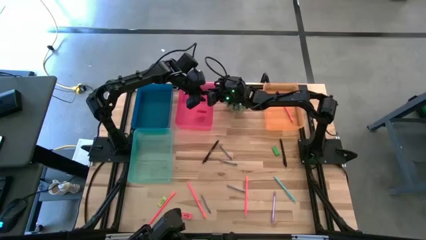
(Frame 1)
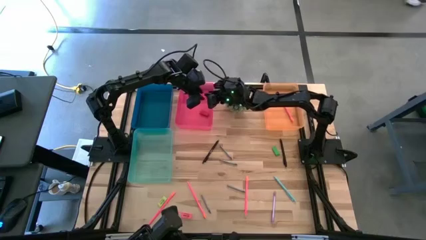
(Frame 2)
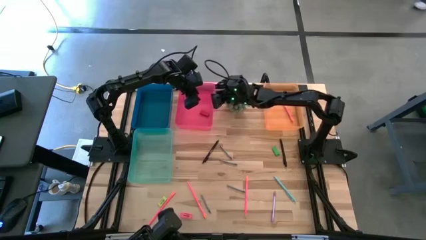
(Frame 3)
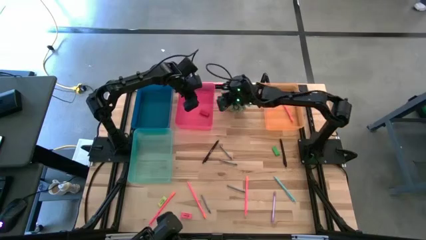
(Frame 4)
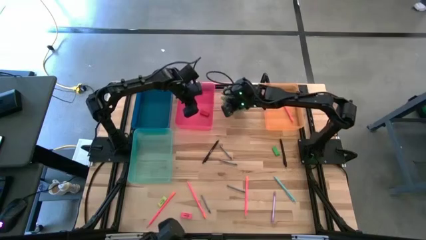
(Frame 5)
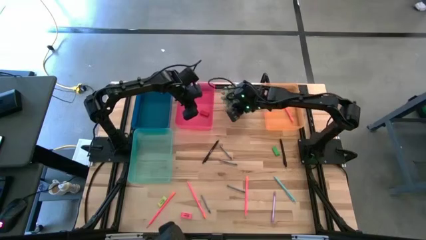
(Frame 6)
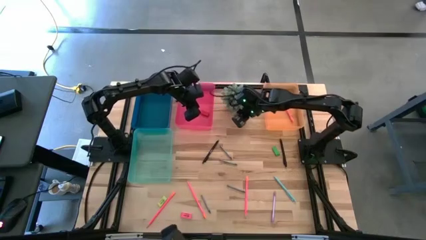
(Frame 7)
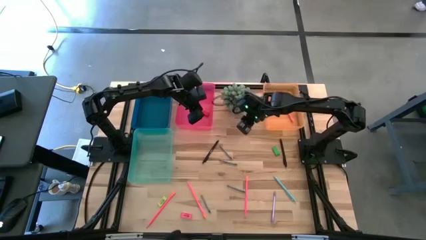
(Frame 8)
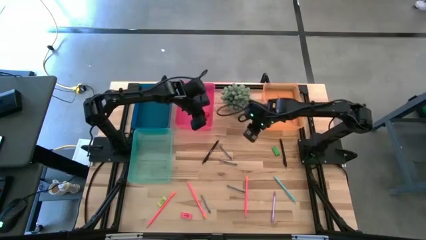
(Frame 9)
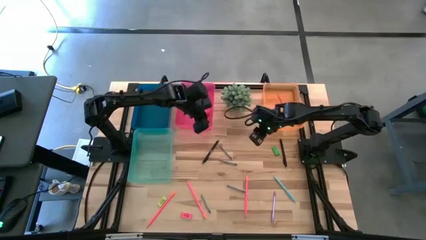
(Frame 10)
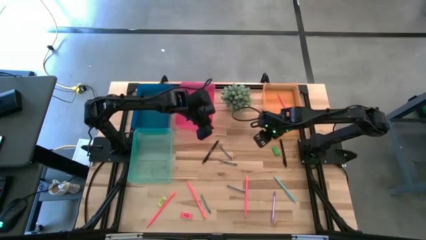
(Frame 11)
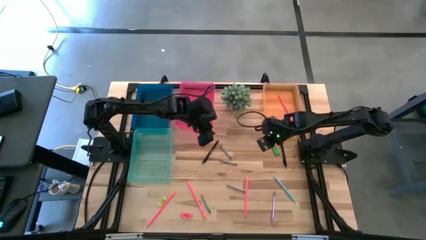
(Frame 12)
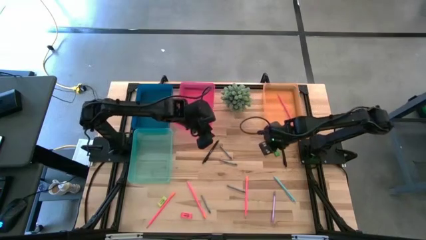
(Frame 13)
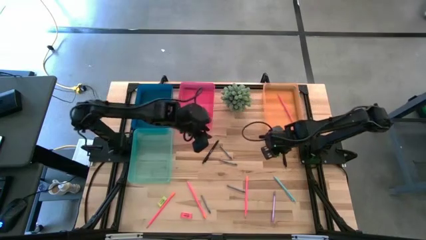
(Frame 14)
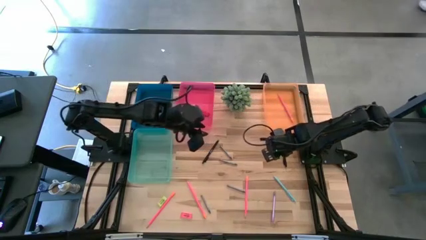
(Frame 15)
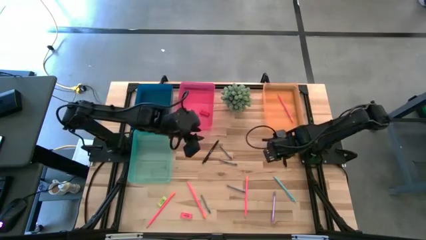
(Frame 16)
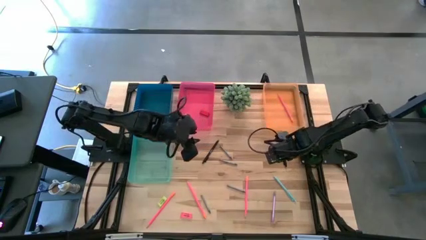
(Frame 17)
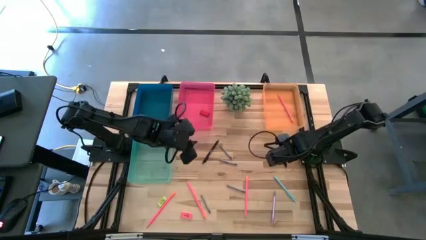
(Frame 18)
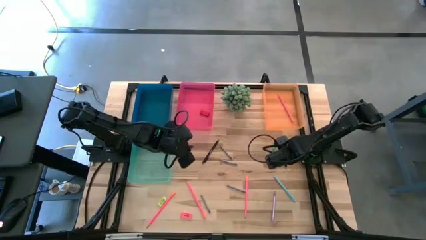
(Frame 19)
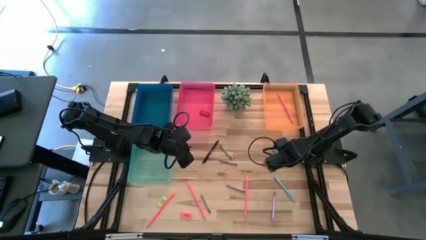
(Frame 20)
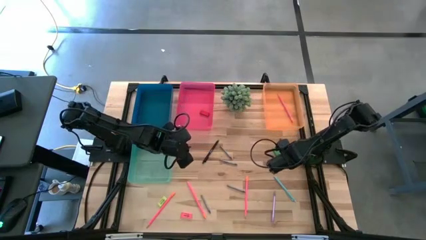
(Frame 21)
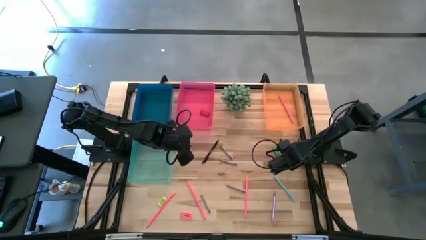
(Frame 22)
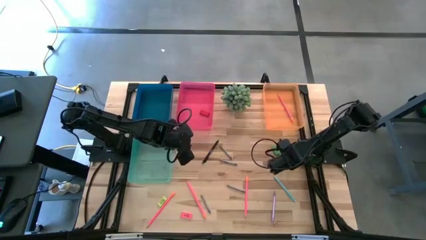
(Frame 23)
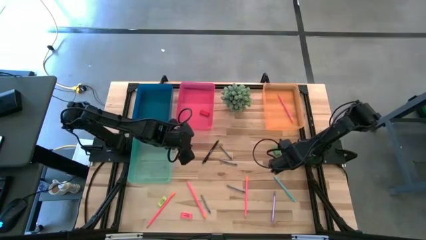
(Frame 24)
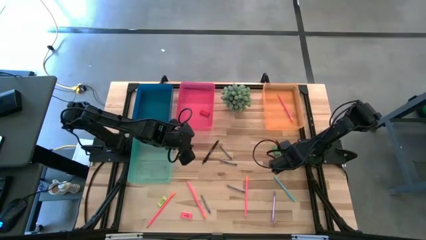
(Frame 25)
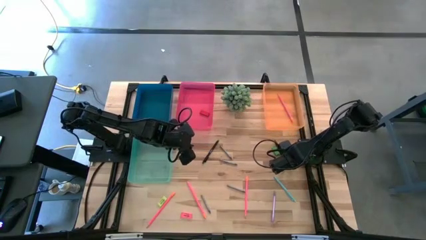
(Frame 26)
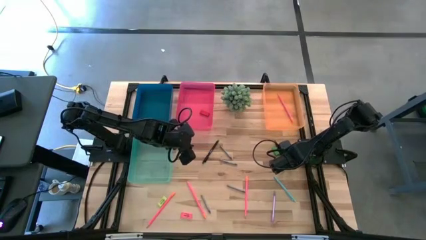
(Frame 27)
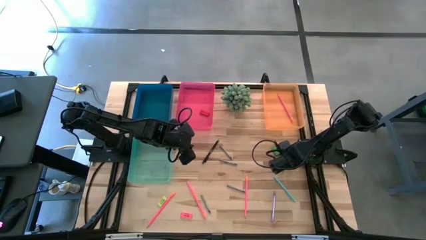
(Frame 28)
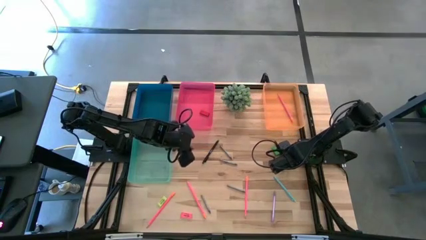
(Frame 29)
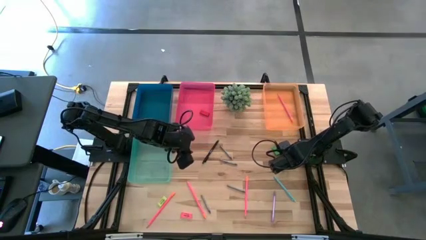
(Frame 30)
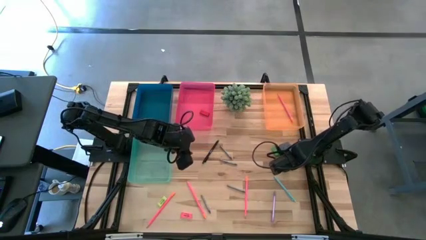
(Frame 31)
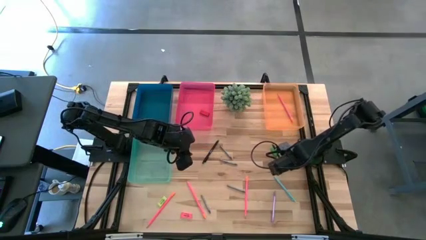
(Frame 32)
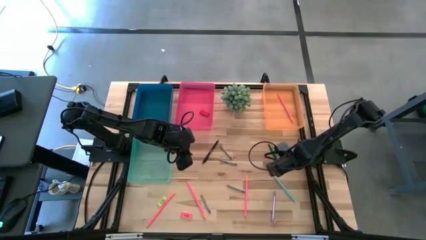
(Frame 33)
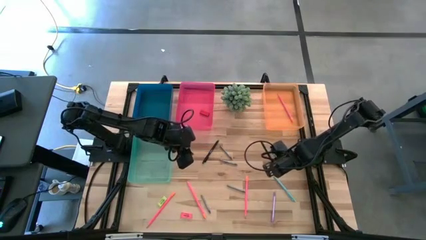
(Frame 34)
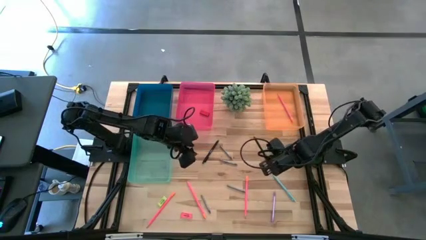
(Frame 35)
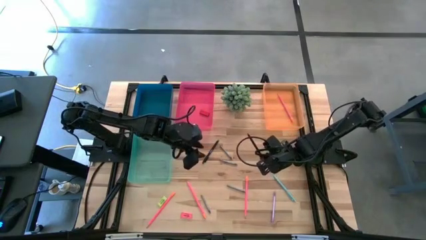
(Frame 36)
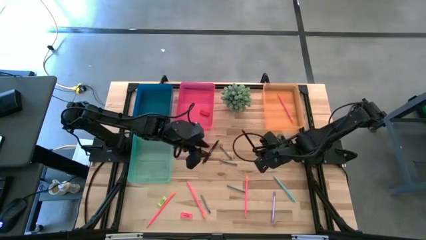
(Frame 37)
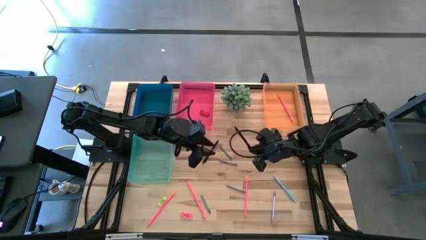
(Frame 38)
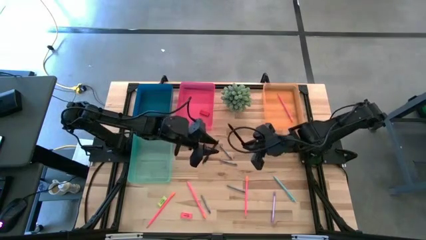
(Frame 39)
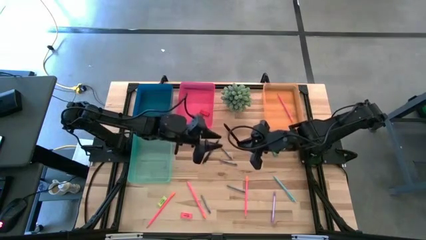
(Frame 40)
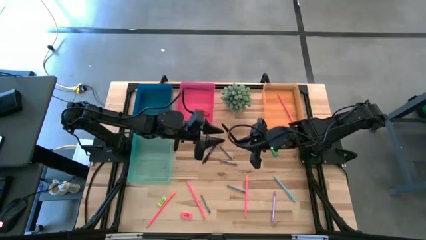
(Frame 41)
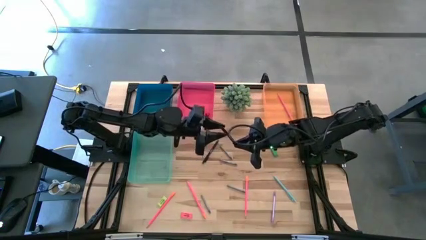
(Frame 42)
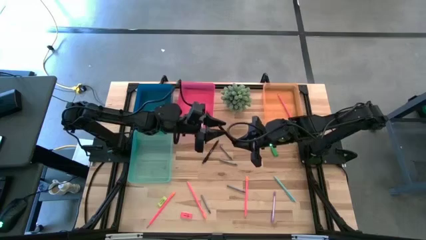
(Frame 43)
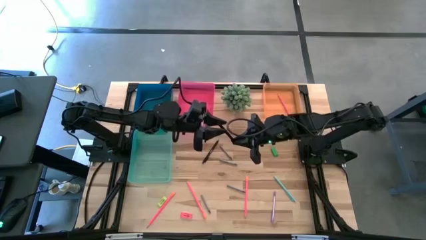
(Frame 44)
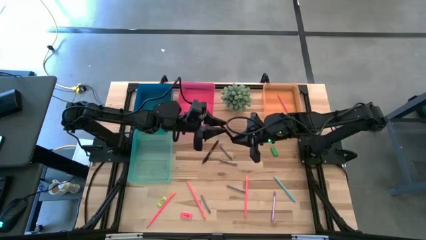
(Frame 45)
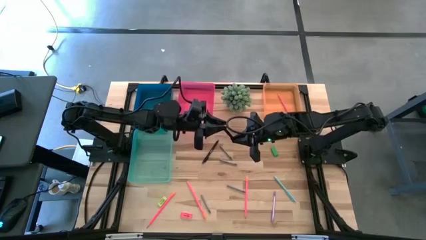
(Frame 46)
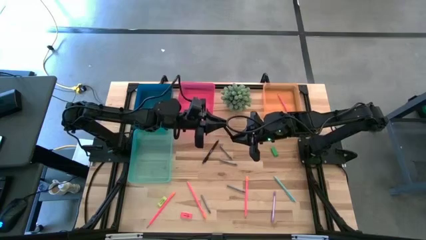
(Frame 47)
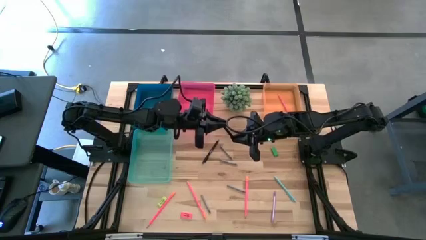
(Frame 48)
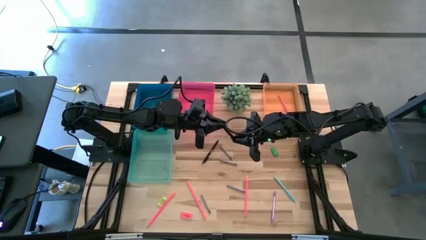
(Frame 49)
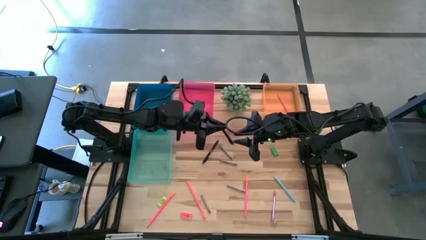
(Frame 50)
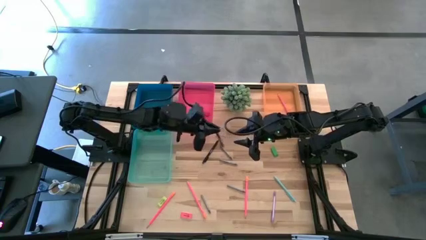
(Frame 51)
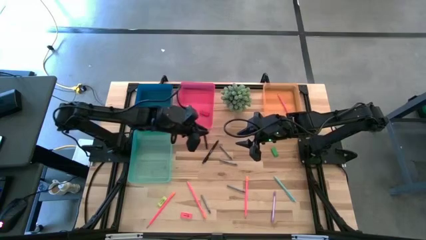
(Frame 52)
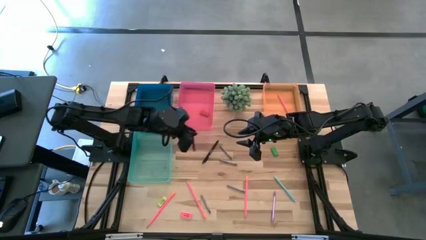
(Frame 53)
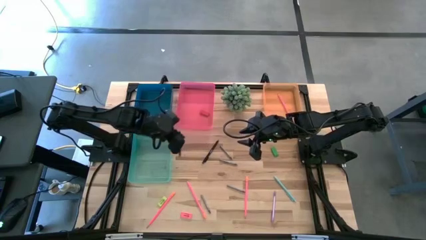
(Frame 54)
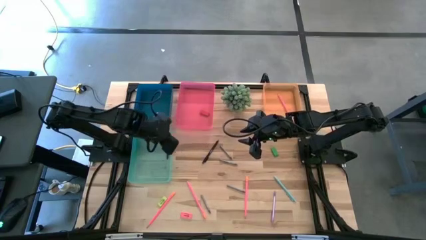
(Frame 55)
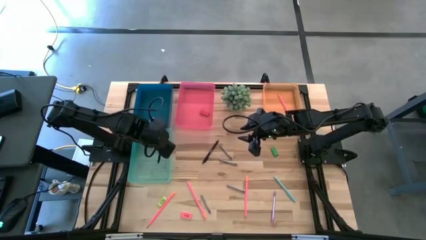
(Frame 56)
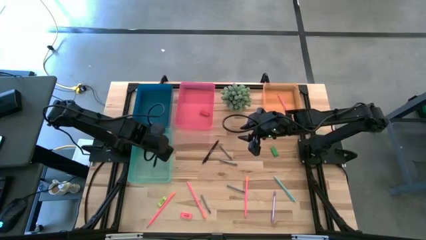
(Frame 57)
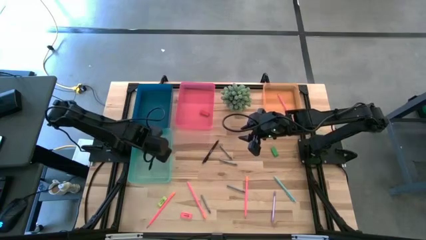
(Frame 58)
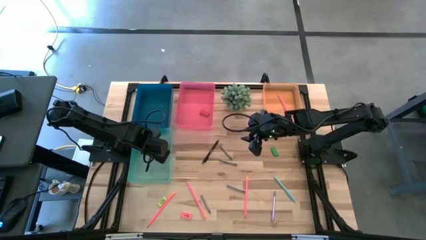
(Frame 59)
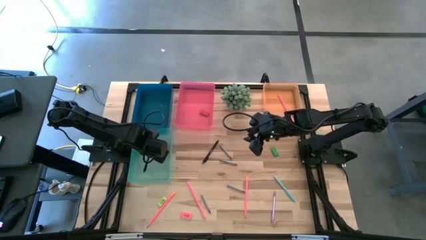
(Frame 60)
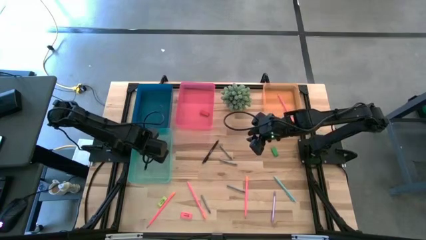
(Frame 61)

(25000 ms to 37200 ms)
Task: Sort crayons/erasers/pens/pencils in bins
Put the black pen into the light blue bin

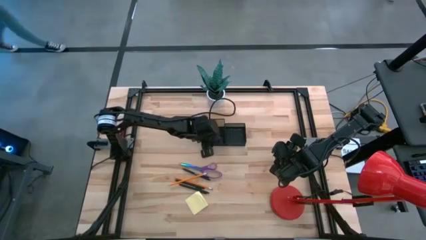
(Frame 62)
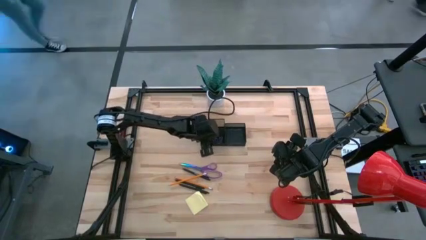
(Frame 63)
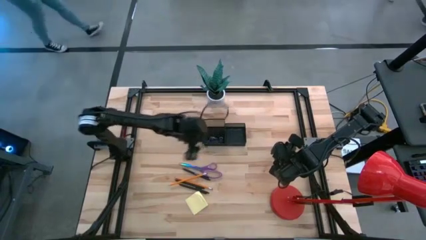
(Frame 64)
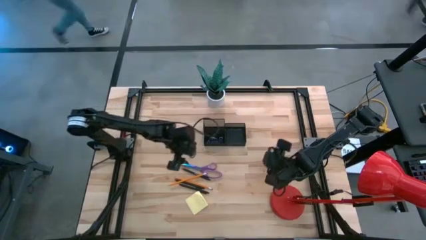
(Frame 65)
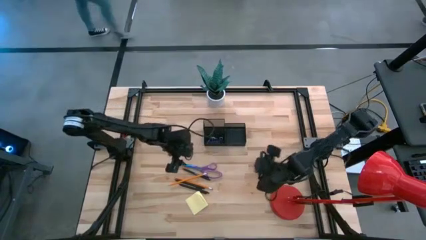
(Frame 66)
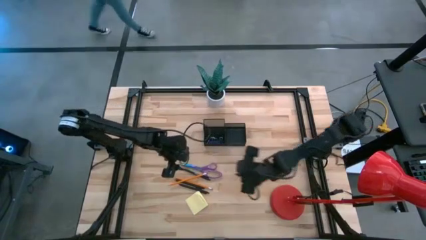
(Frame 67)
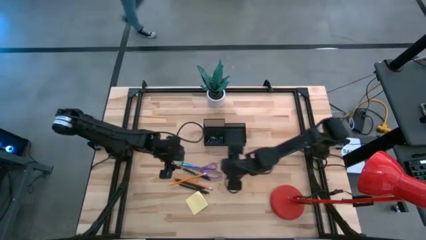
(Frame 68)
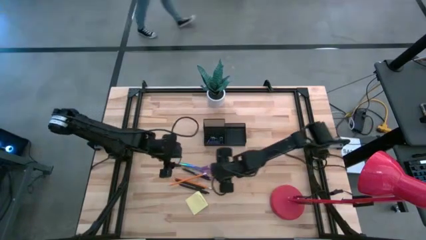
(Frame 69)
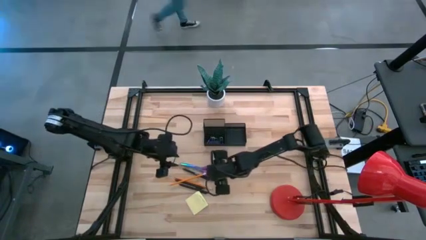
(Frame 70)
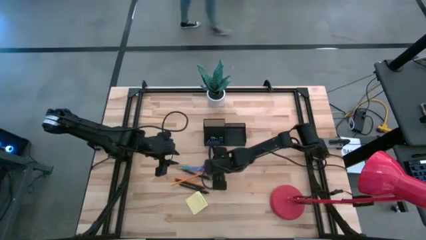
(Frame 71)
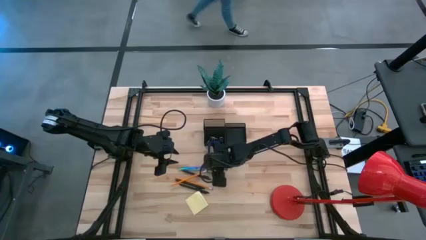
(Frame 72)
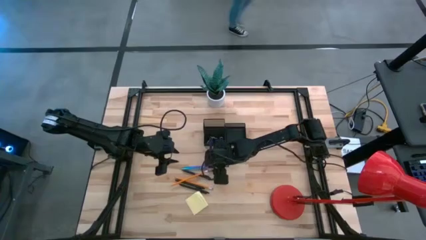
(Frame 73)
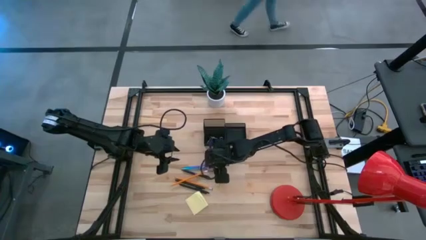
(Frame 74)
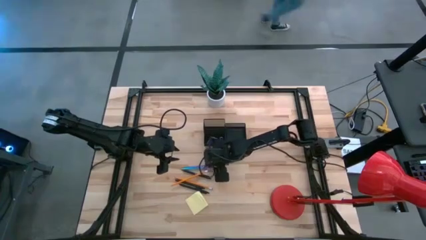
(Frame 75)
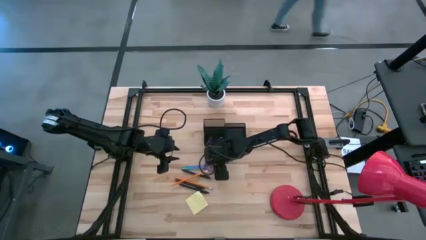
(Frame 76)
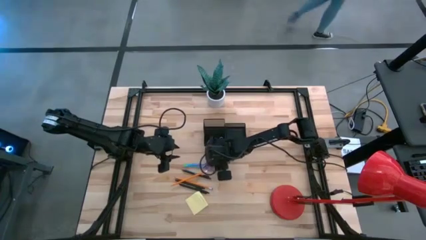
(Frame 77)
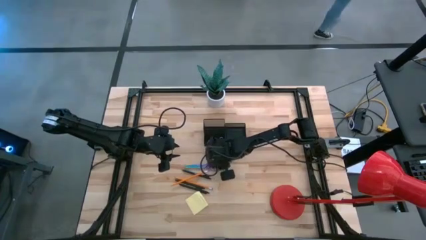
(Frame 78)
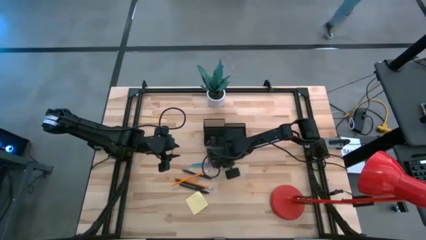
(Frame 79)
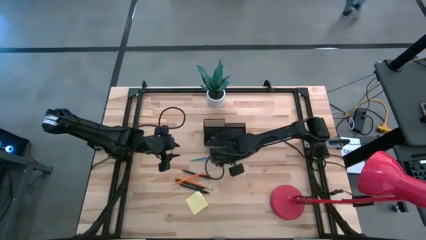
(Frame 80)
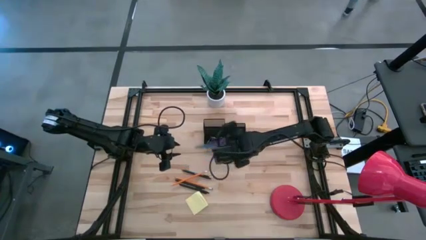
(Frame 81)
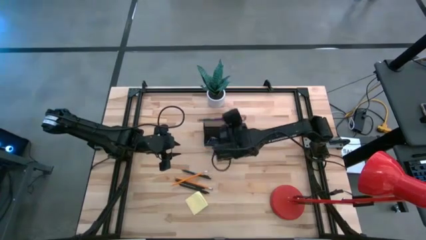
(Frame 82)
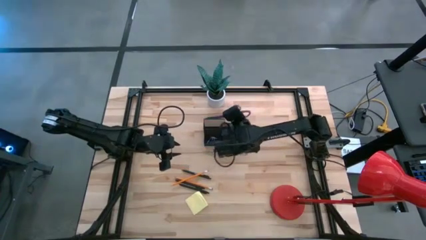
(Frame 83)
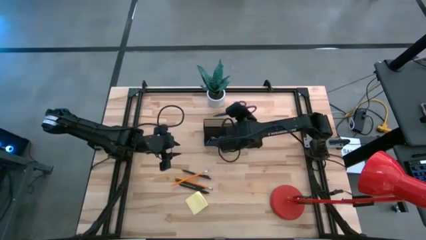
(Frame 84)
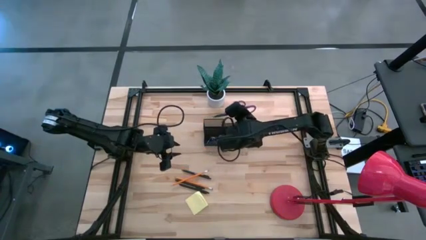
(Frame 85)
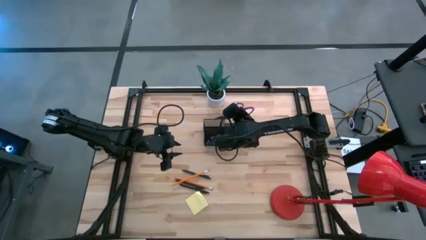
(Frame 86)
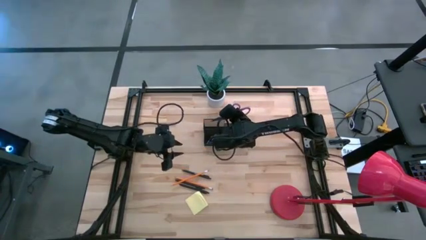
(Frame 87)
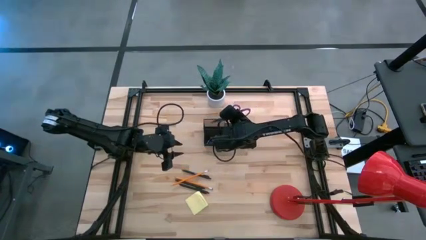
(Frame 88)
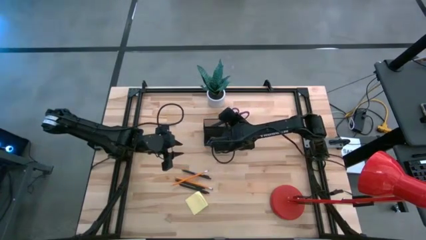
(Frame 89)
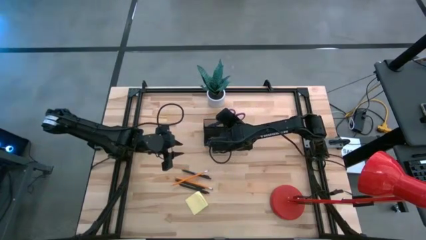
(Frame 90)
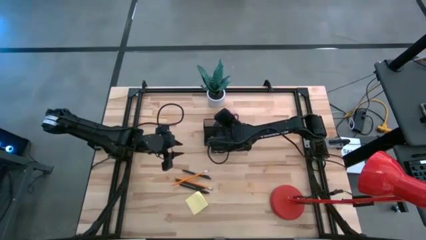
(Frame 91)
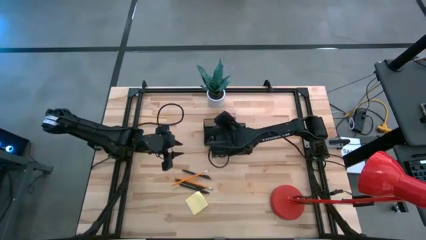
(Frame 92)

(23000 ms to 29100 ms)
Task: Pick and place office supplies into organizer
Put the purple scissors into the black organizer
